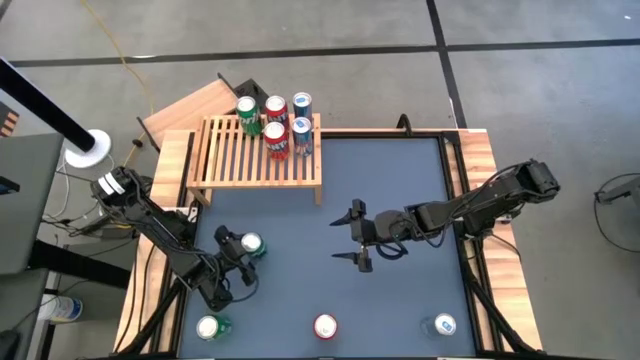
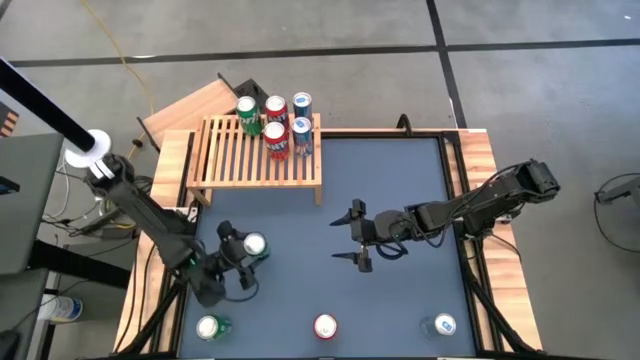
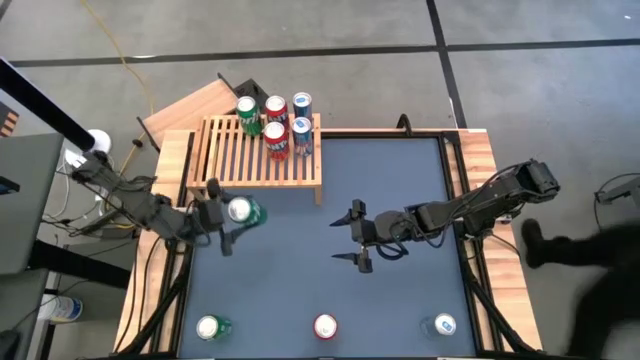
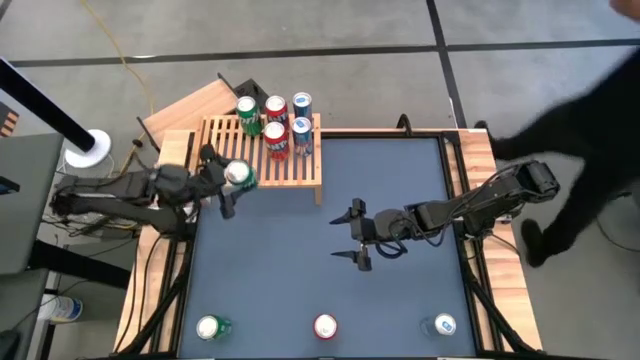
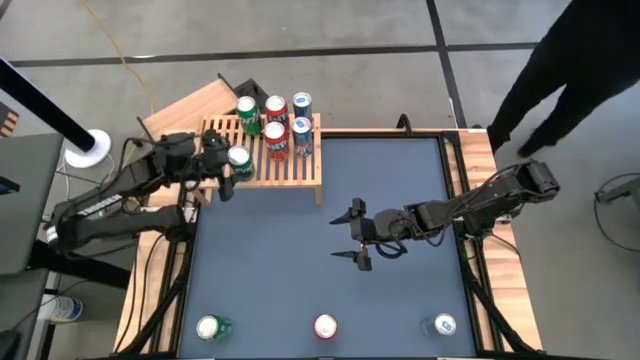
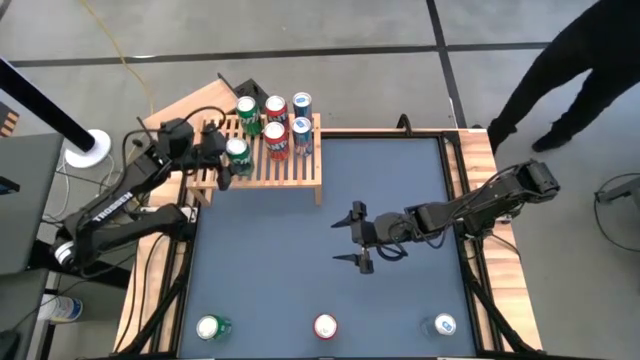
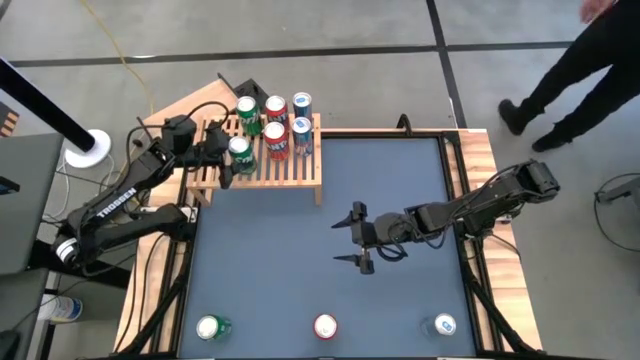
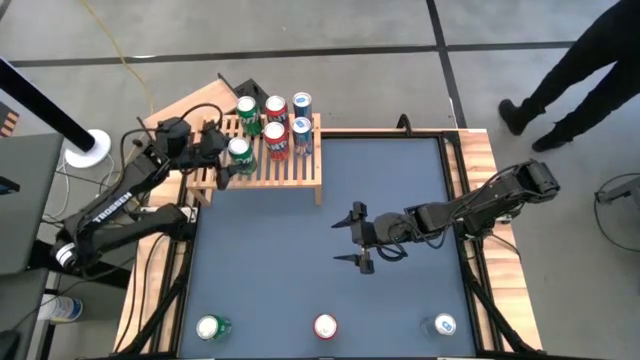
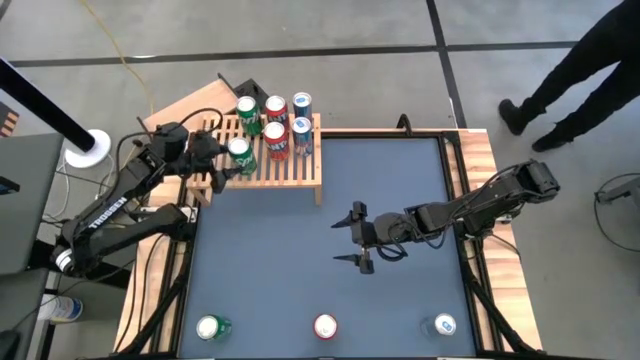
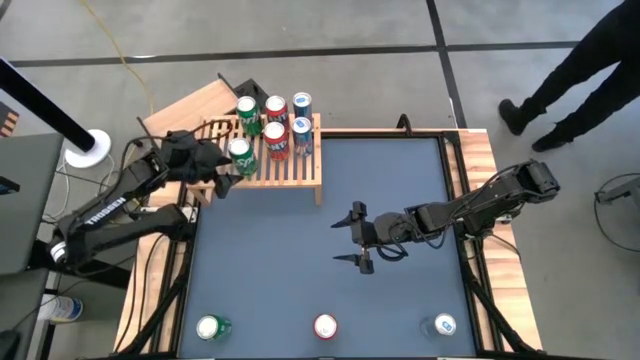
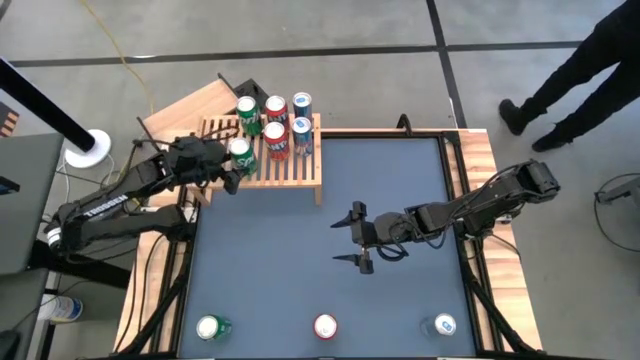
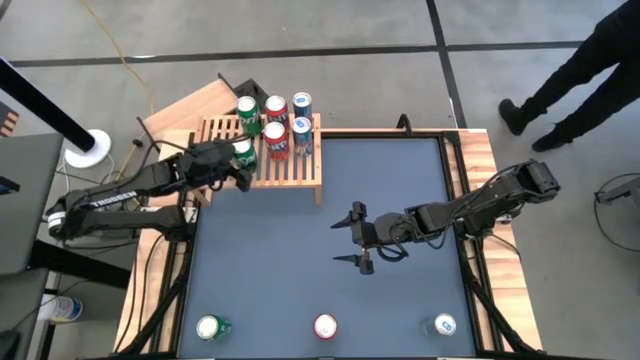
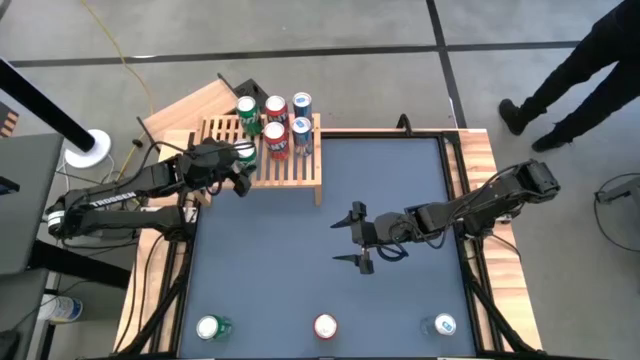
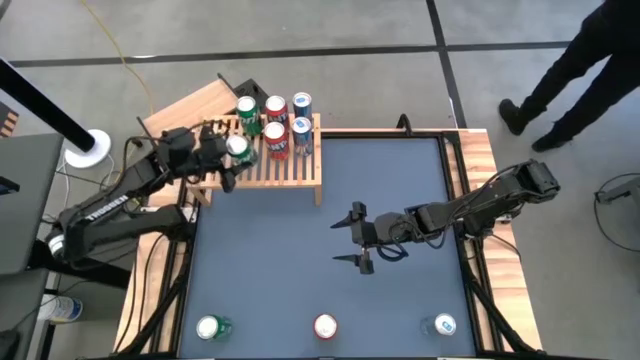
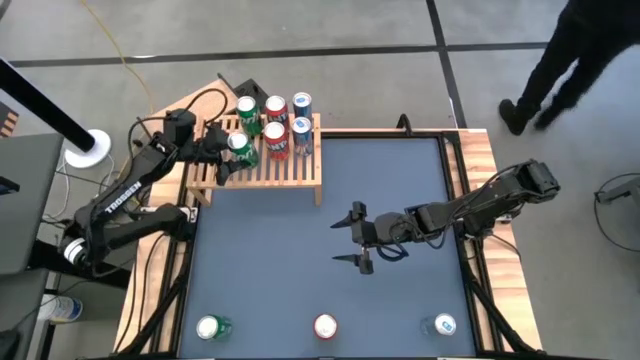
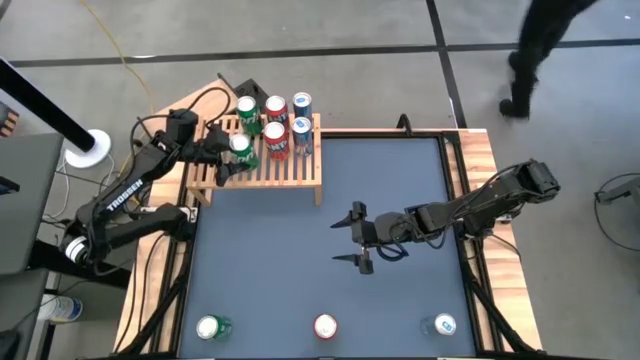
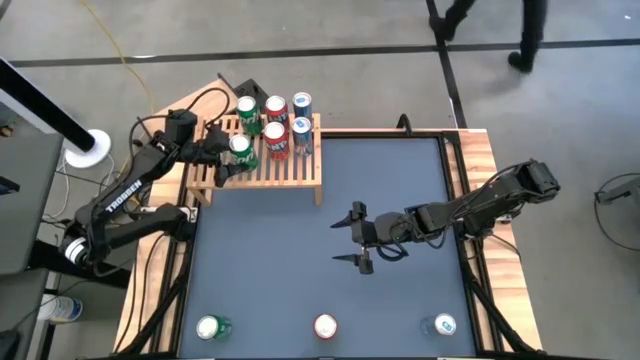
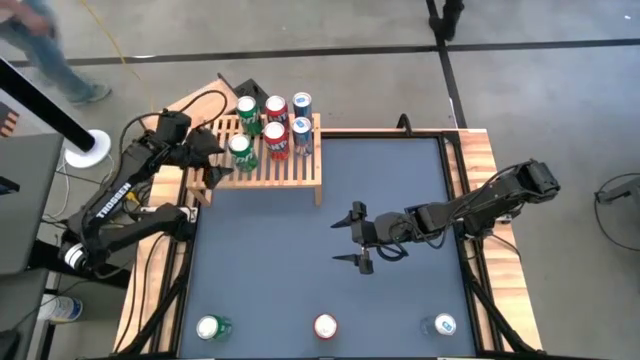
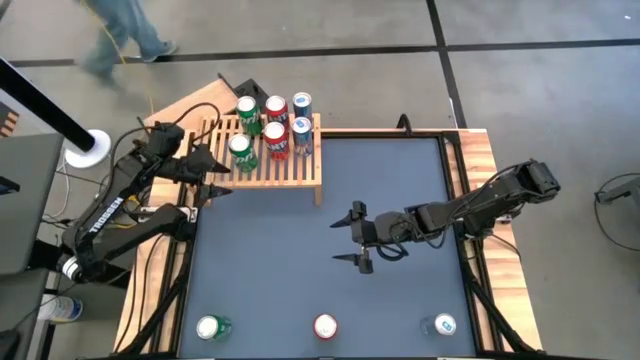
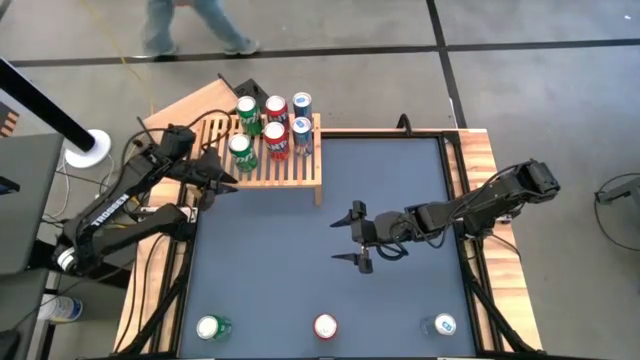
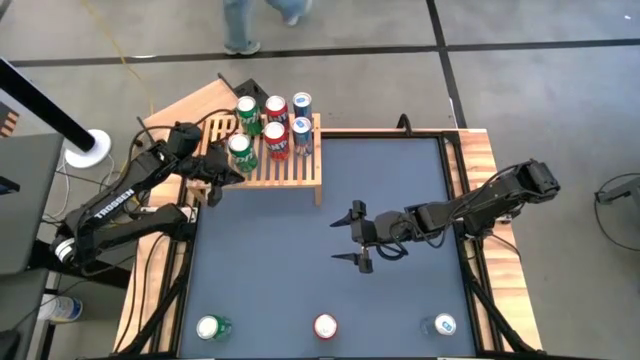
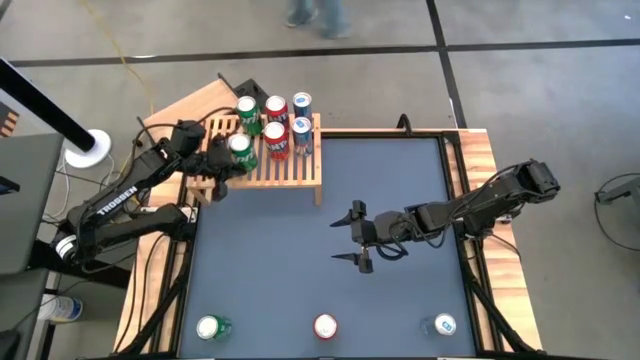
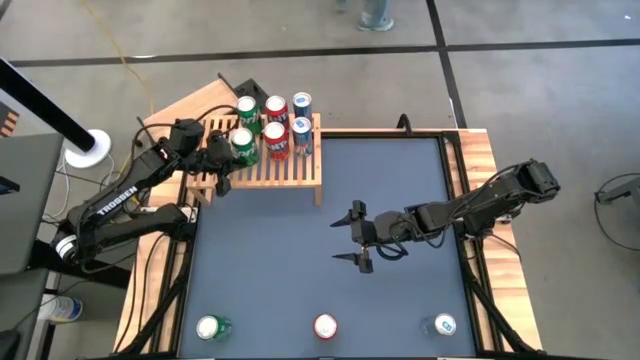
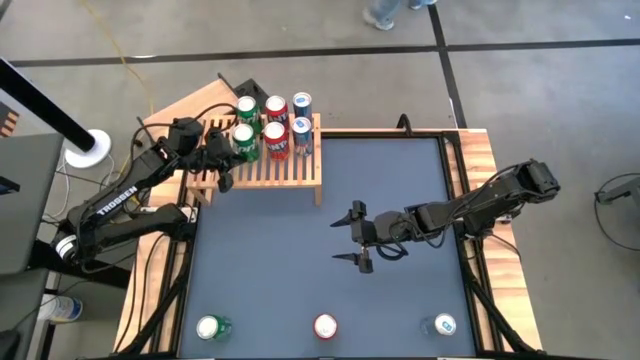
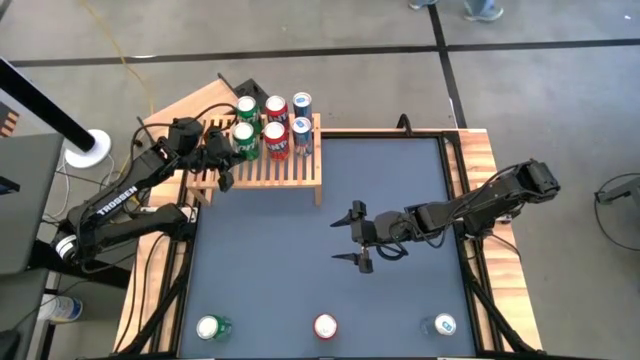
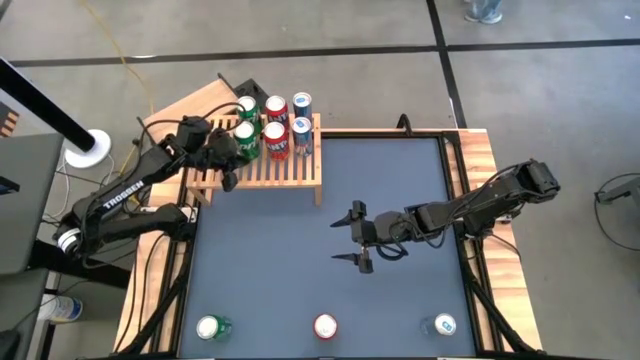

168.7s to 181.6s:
Task: Place canned beverage on shelf
Put the top green soda can on the shelf aligned with the other green soda can
